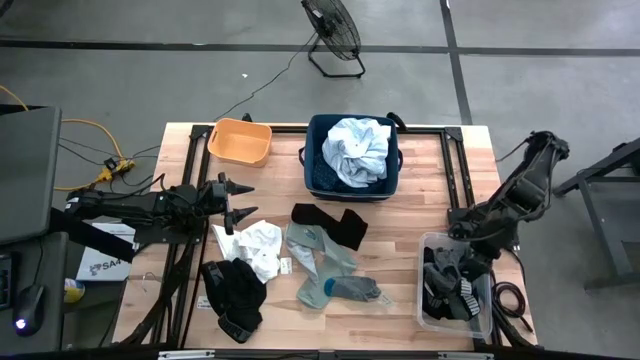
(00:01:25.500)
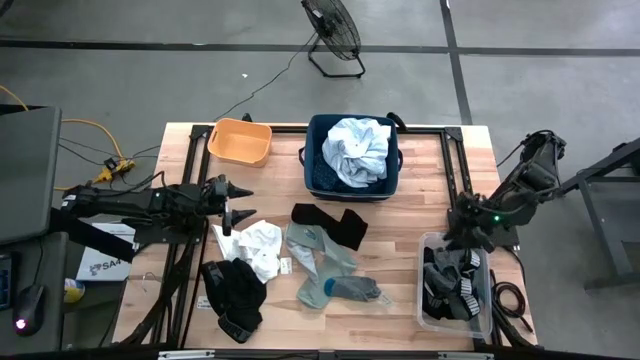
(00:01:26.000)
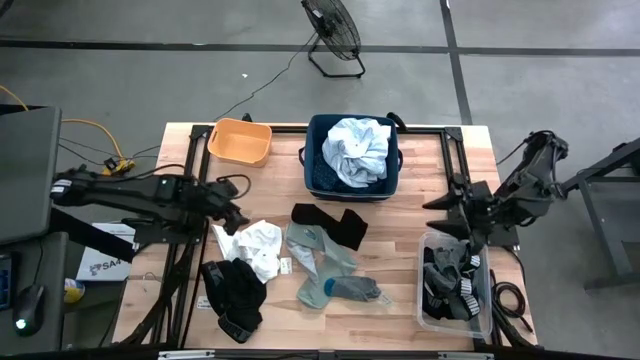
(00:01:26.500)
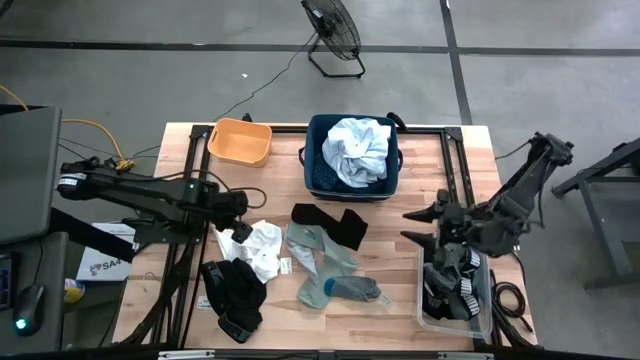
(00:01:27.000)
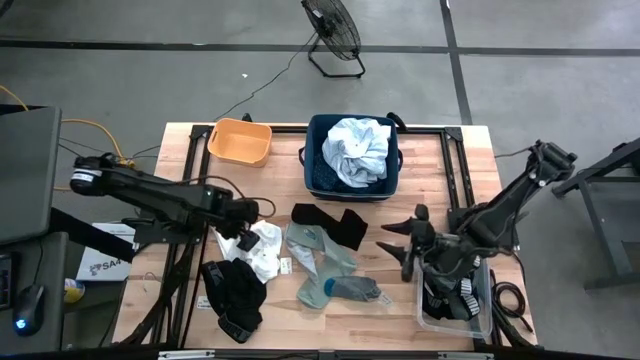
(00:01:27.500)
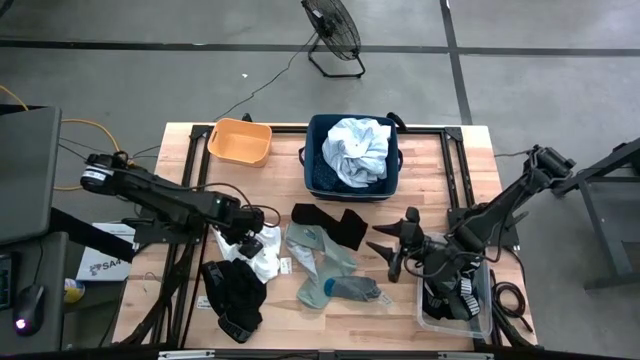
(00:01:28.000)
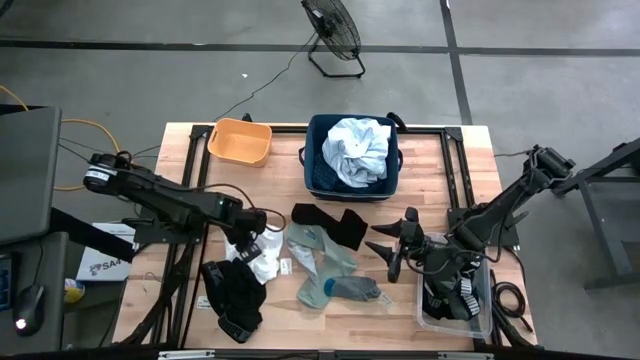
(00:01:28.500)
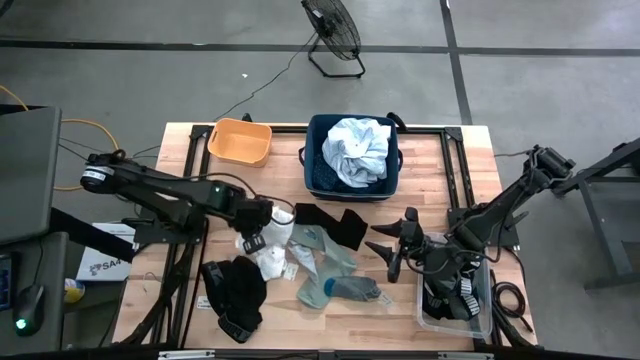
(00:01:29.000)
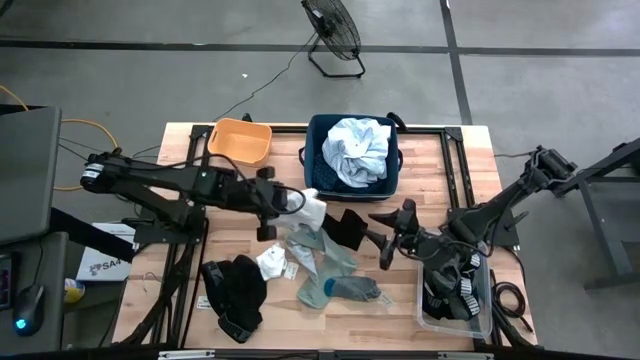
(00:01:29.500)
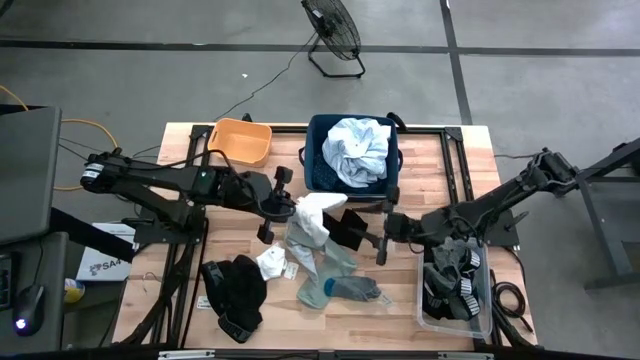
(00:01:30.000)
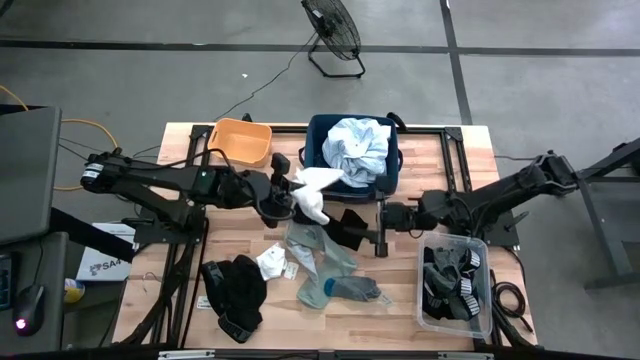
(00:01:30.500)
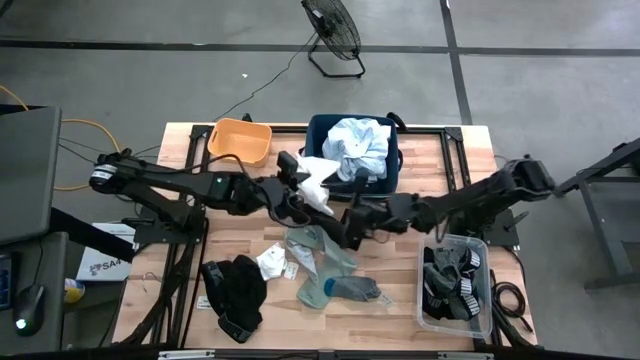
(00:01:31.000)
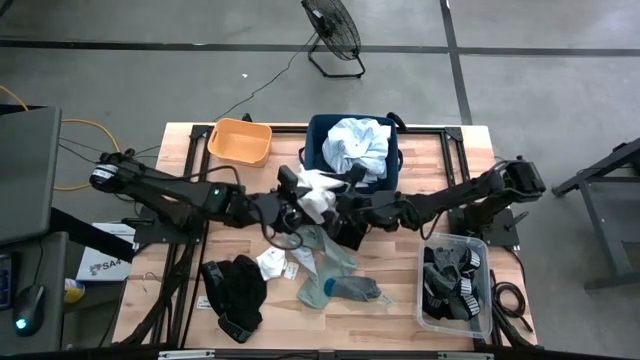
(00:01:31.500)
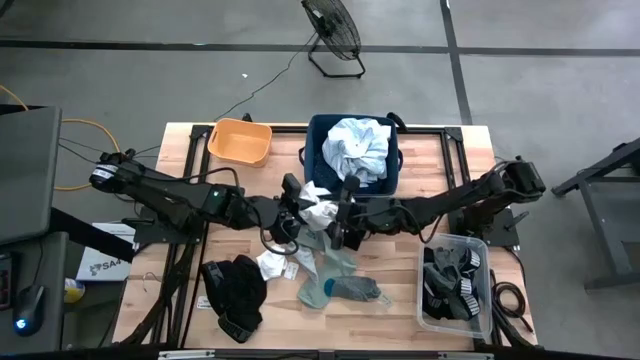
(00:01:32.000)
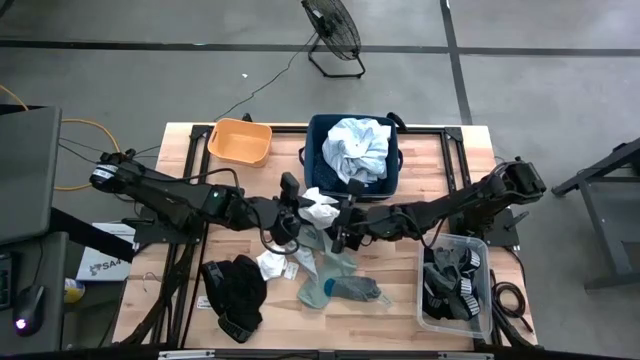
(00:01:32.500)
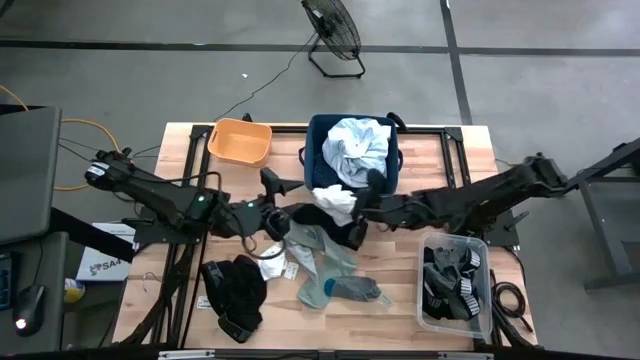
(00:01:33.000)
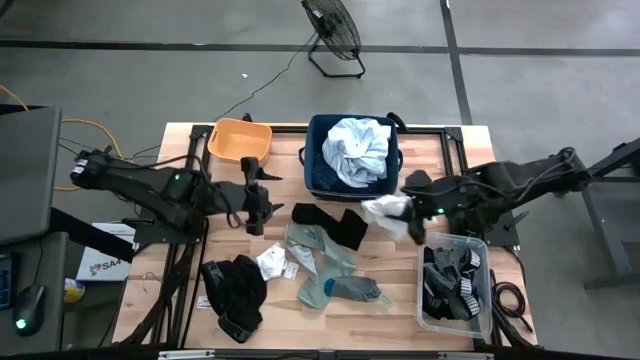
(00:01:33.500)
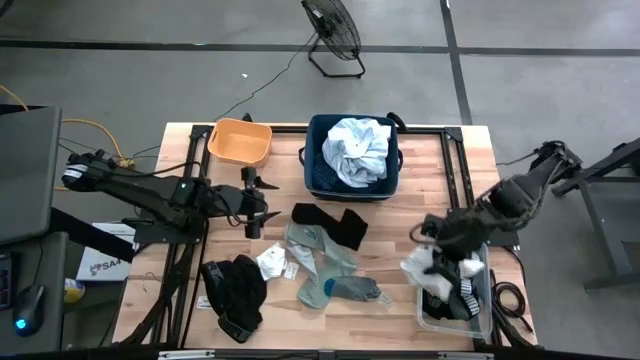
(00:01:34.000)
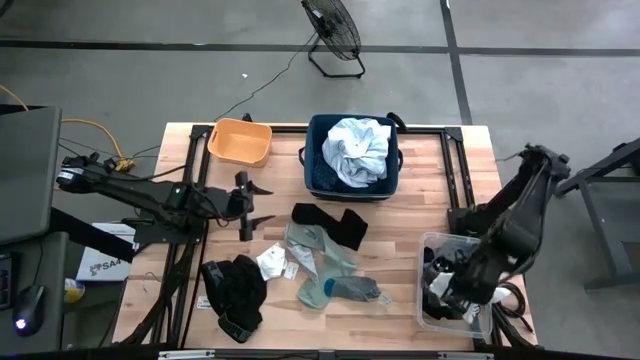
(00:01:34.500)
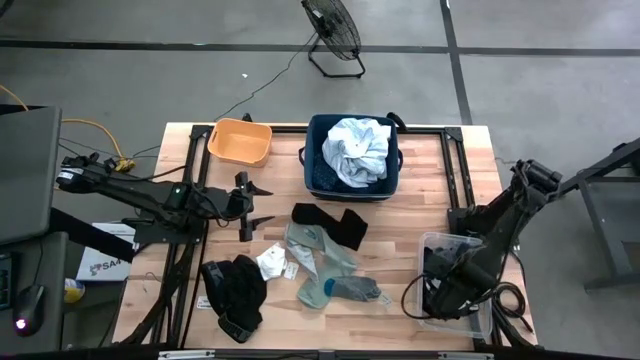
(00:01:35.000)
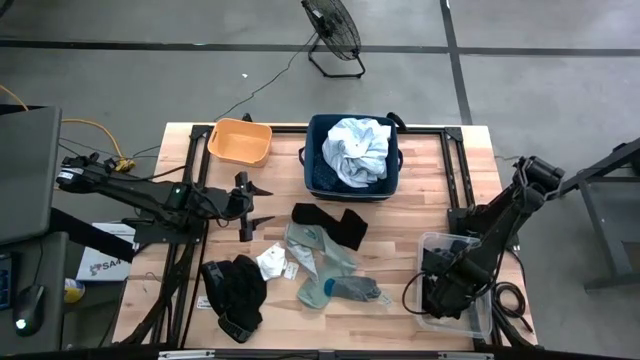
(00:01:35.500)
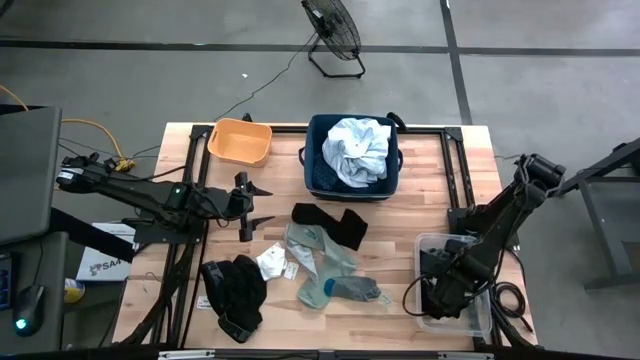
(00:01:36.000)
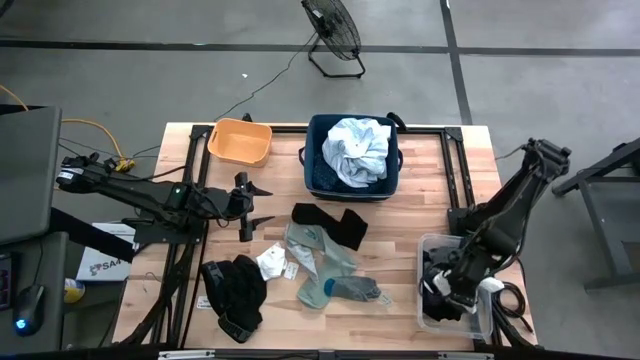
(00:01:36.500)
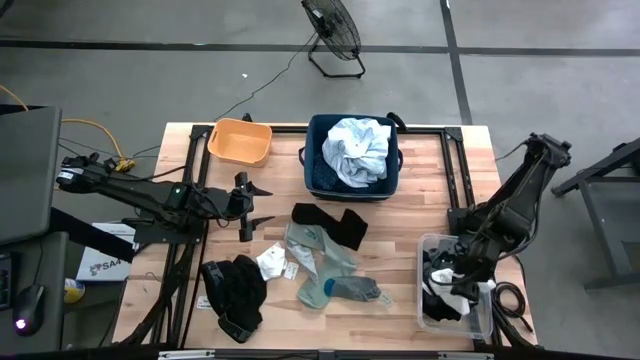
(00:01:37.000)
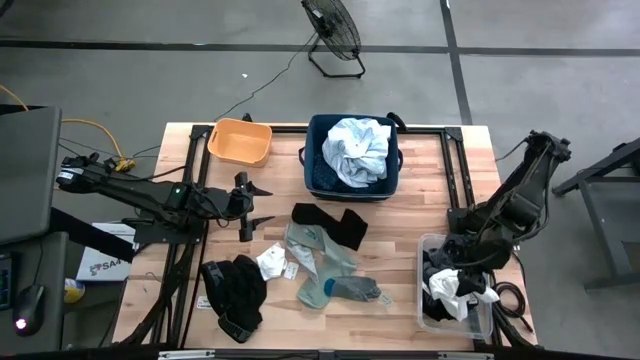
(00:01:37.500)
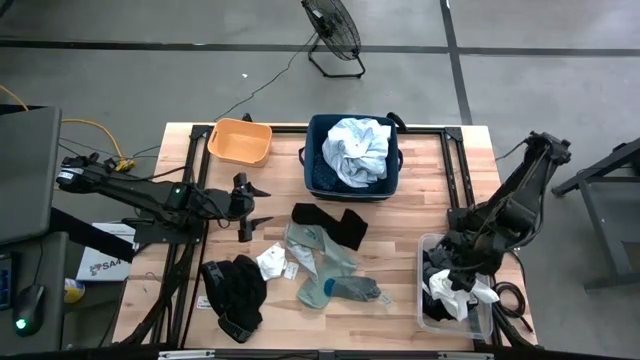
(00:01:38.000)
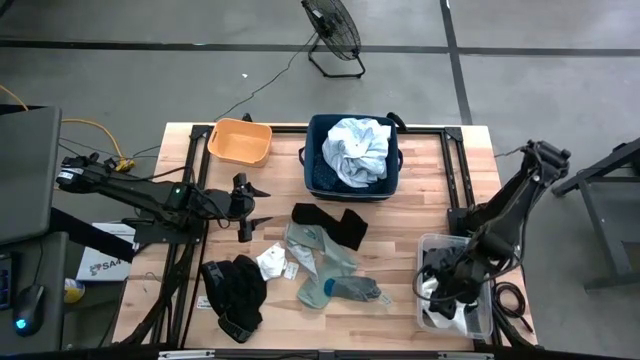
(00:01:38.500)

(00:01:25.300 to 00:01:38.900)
Task: Pick & Place Cloths
Put the white boxer shorts into the transparent bin
